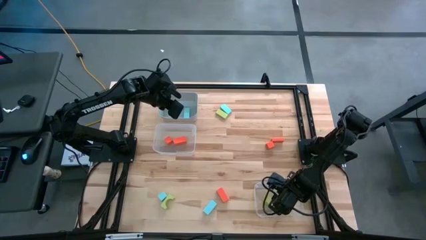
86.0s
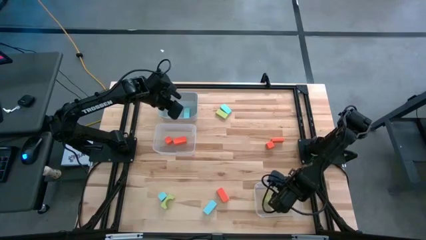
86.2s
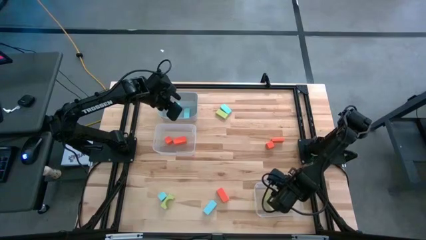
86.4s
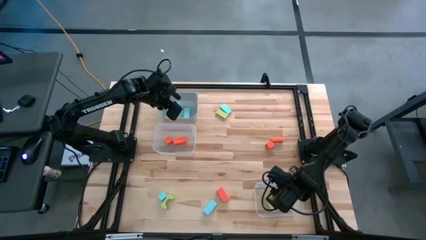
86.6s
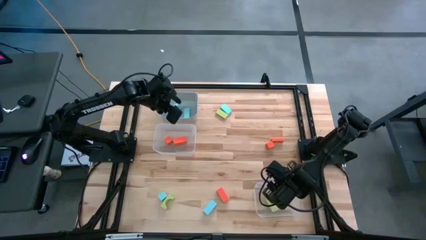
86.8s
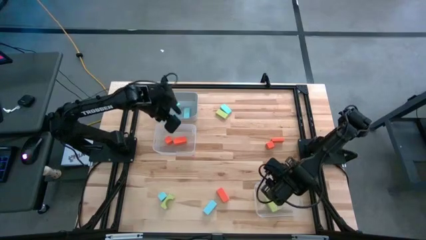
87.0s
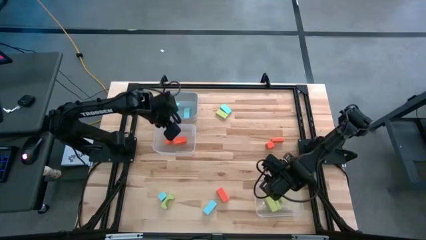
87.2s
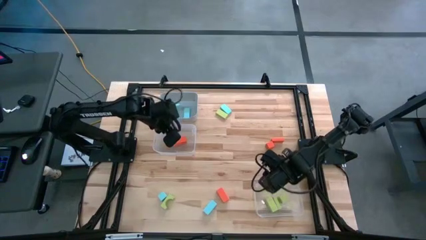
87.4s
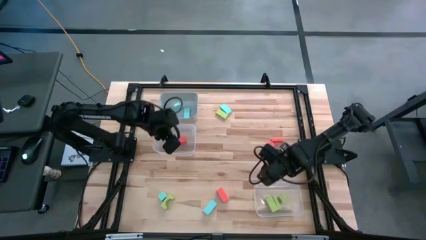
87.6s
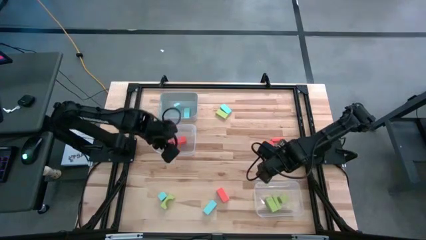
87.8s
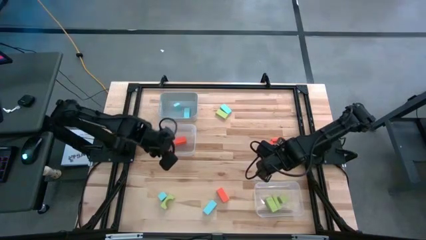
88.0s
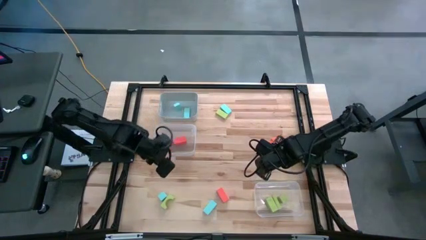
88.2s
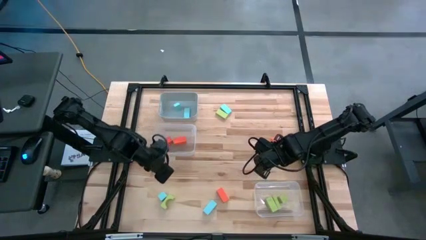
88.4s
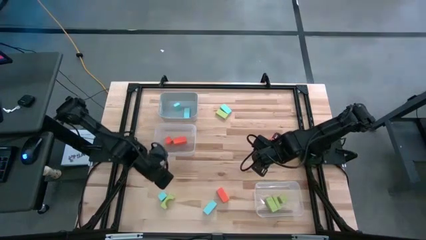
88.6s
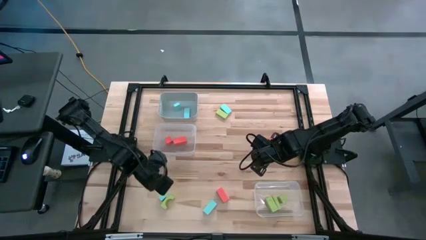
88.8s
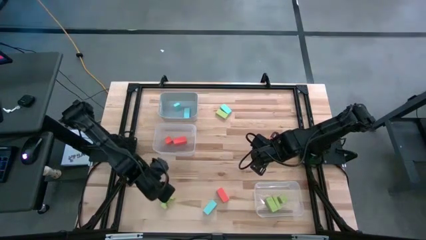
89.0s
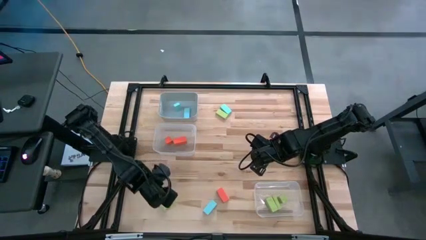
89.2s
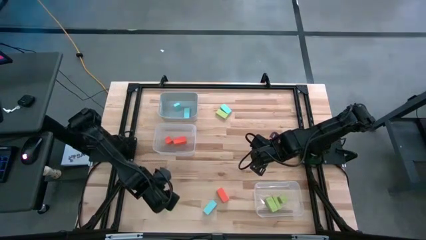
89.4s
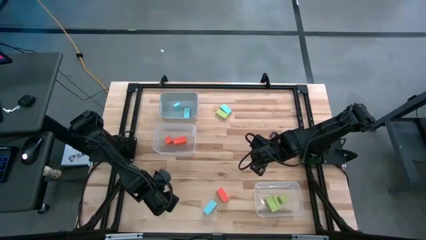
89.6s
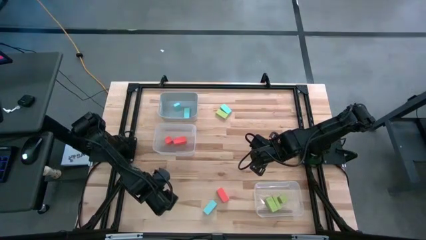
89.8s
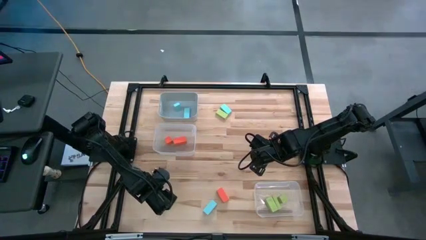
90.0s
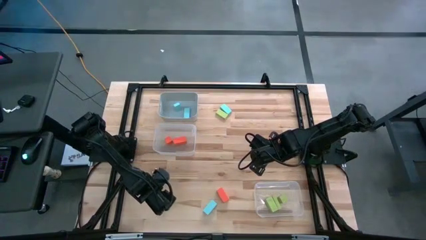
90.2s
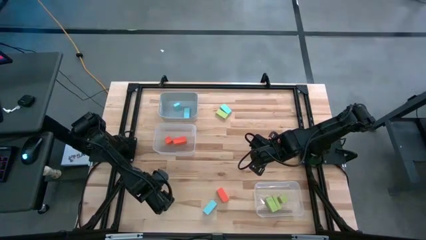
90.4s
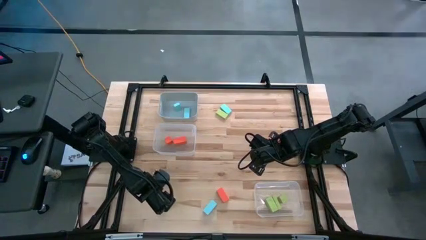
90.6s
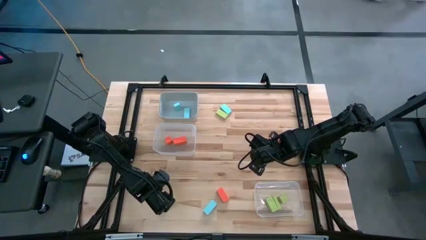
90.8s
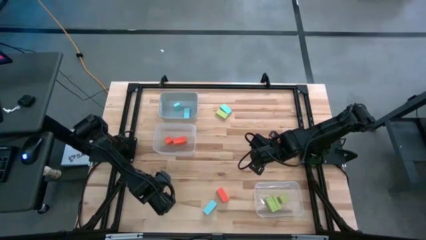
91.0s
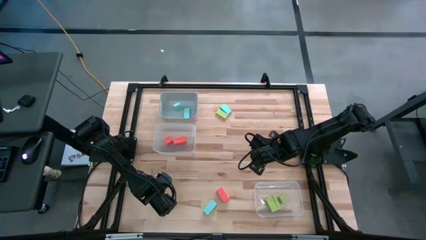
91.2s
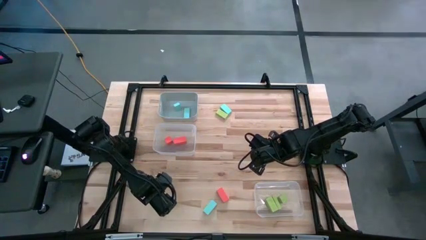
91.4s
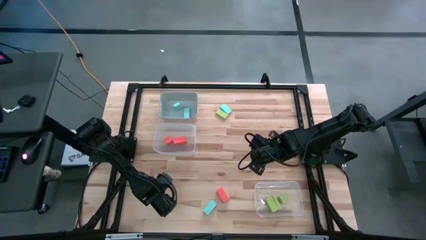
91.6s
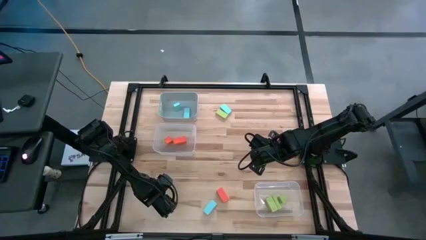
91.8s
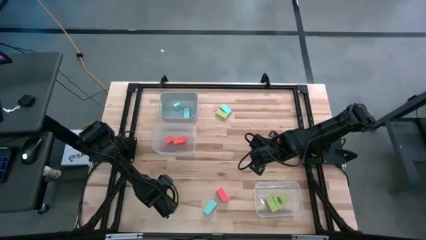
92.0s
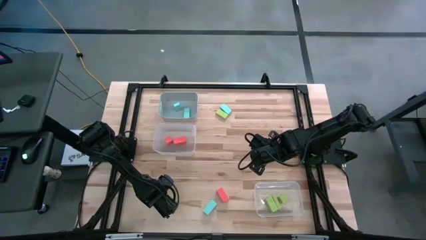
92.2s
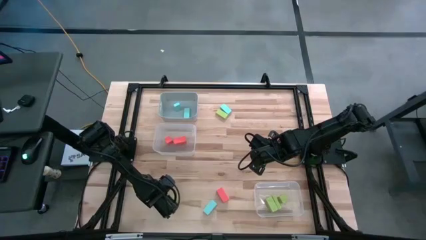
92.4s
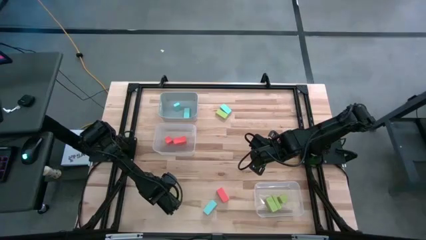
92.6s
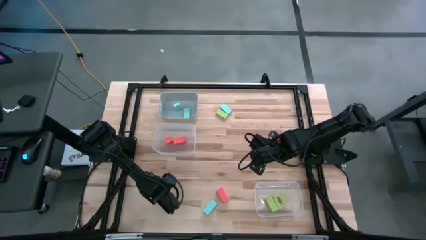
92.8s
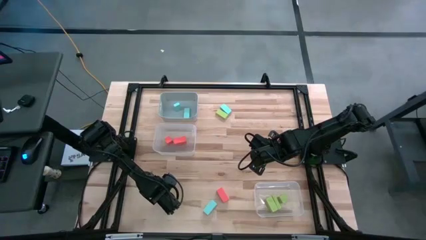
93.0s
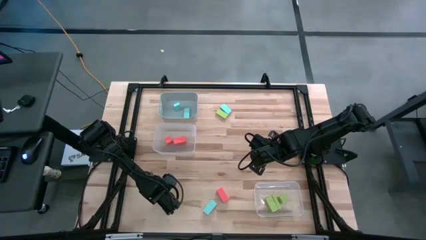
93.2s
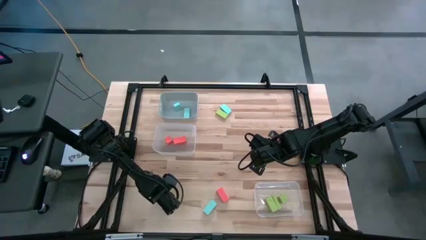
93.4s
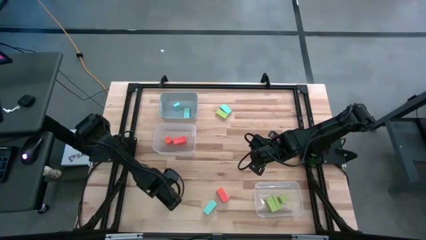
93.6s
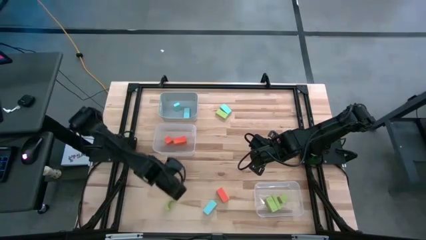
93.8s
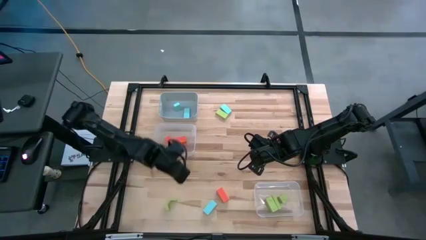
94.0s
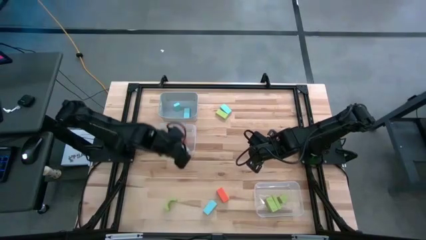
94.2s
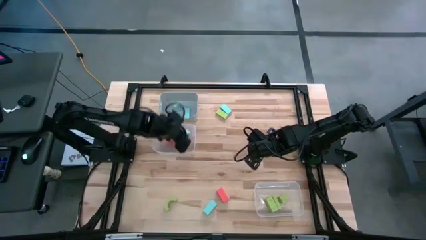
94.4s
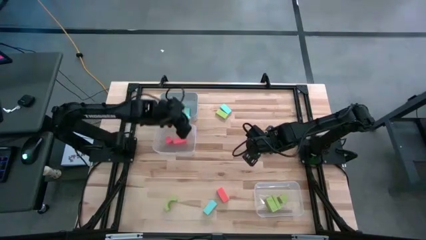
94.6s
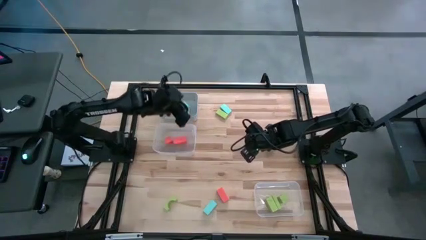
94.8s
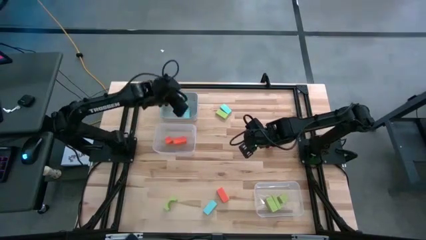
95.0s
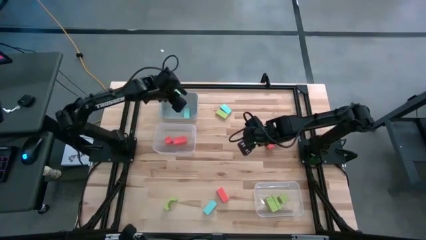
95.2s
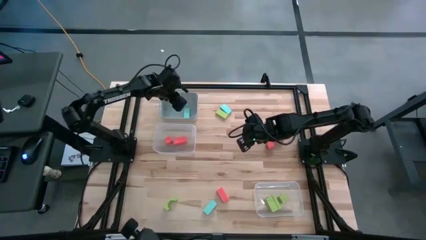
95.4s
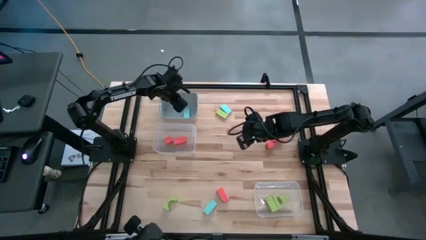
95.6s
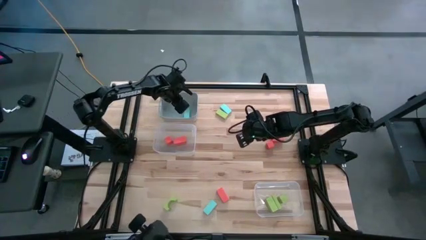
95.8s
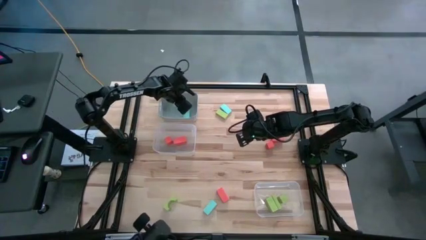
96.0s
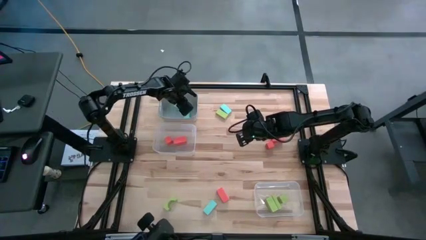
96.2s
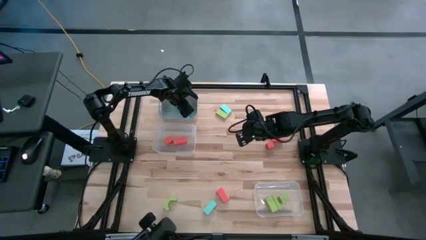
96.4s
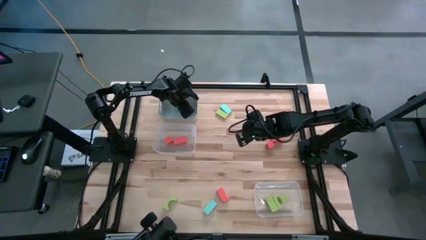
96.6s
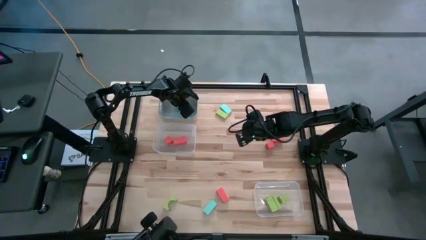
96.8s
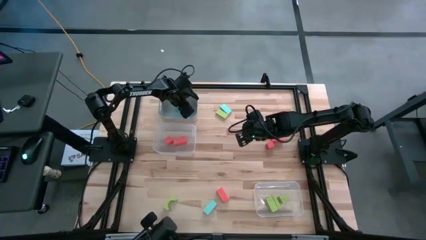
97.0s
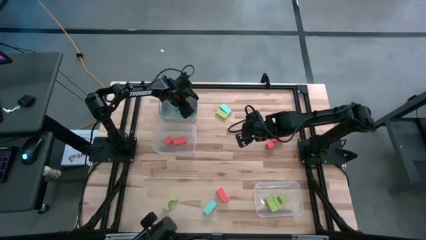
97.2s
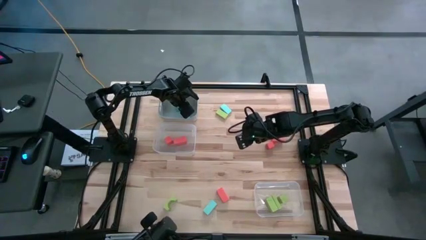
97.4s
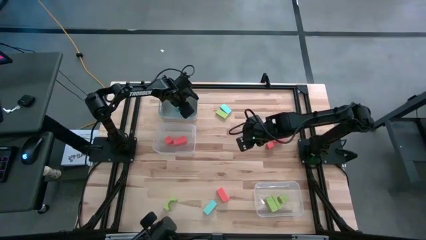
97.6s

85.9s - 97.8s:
Task: Sort & place blocks by color
Put the blue block into the gray bin

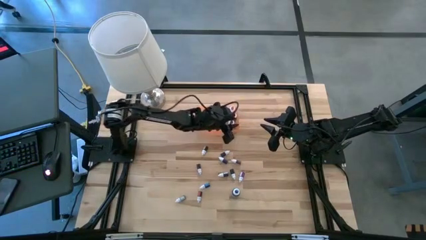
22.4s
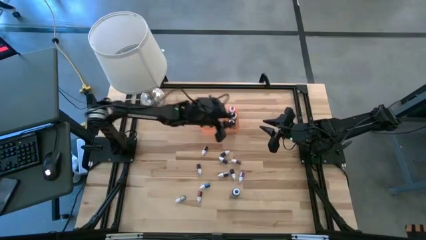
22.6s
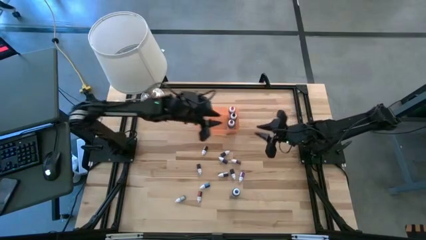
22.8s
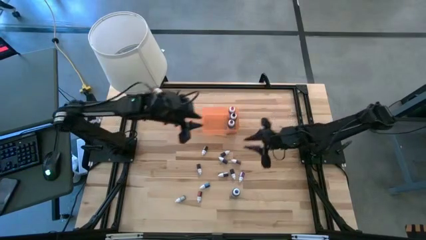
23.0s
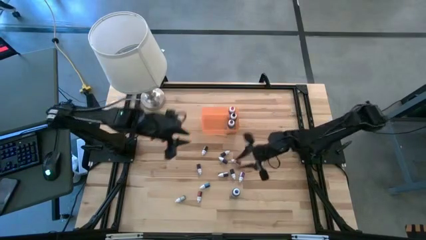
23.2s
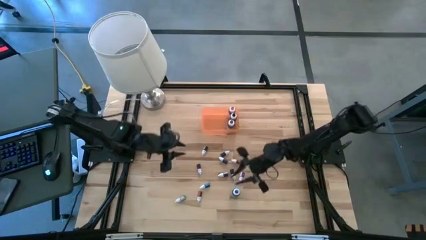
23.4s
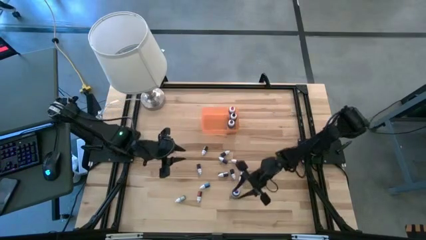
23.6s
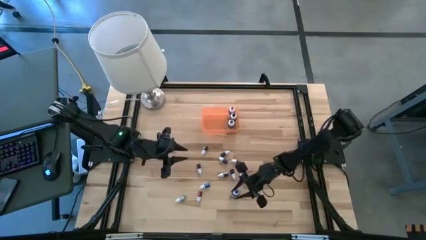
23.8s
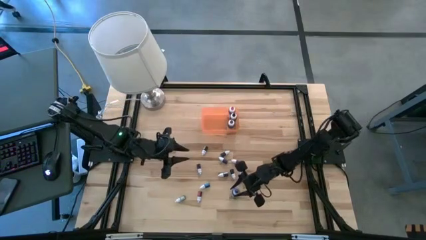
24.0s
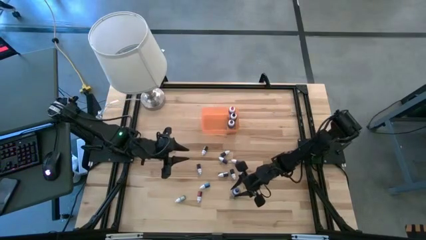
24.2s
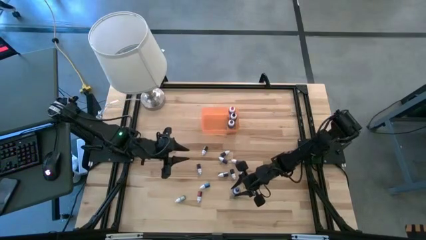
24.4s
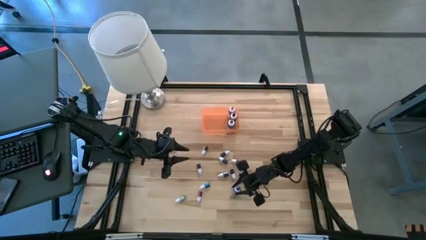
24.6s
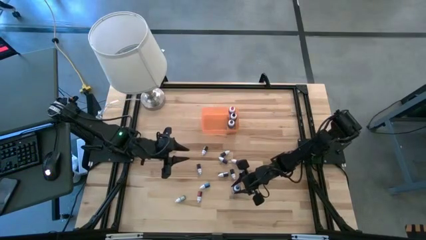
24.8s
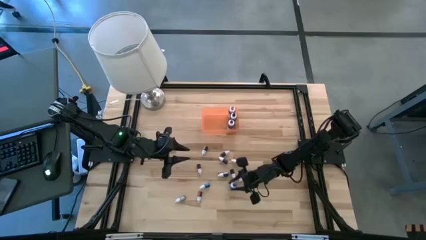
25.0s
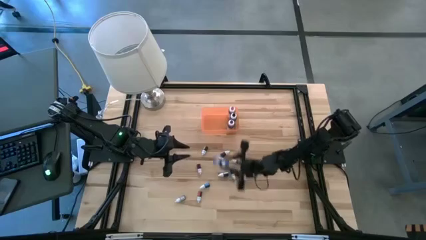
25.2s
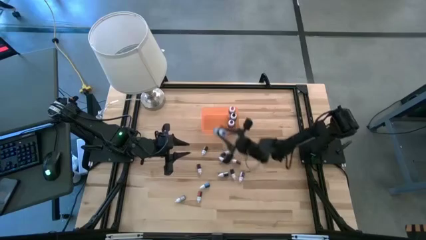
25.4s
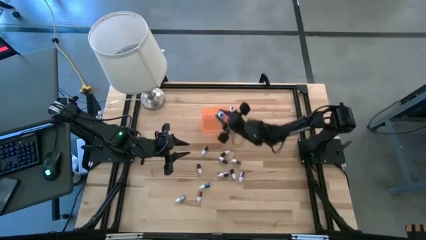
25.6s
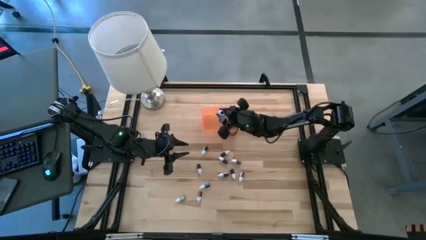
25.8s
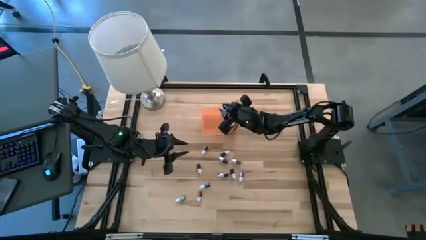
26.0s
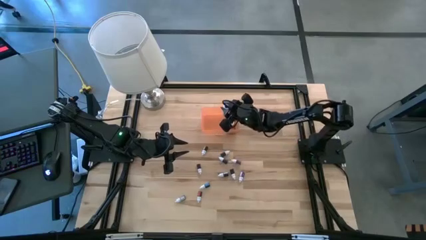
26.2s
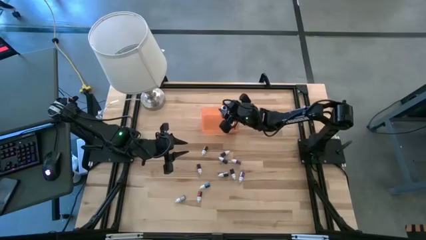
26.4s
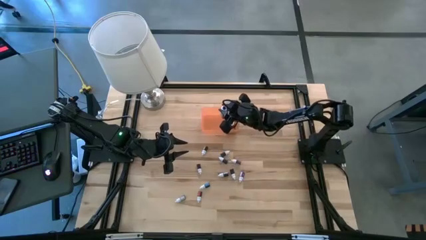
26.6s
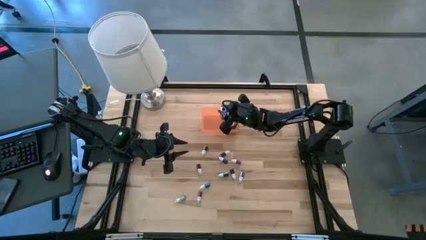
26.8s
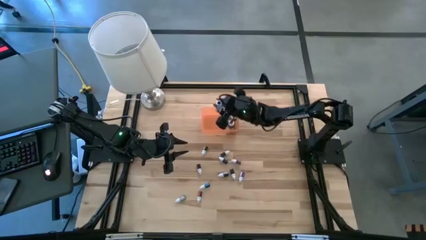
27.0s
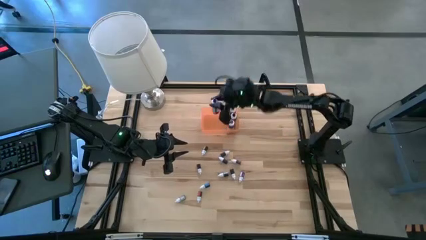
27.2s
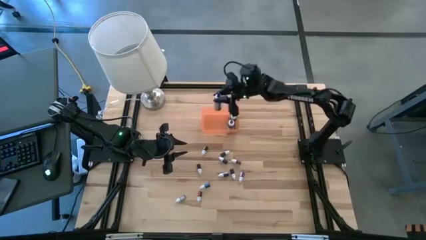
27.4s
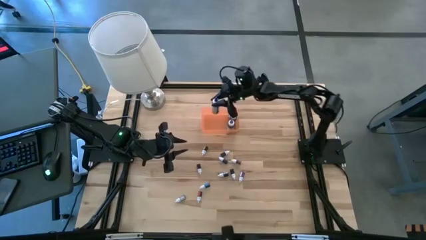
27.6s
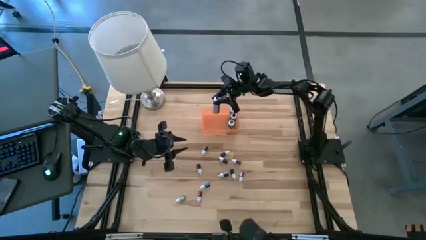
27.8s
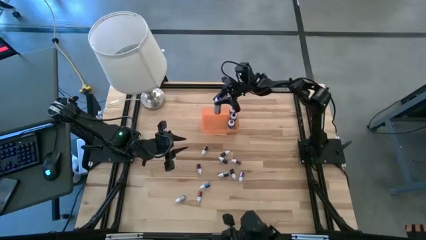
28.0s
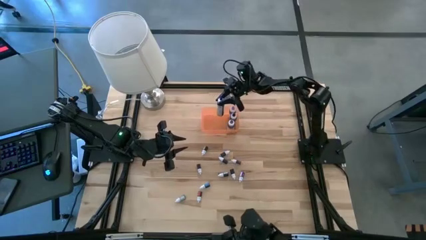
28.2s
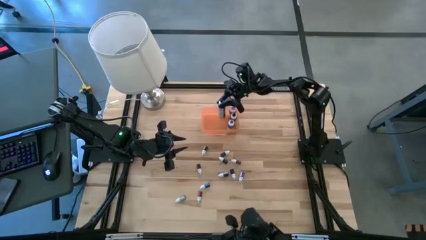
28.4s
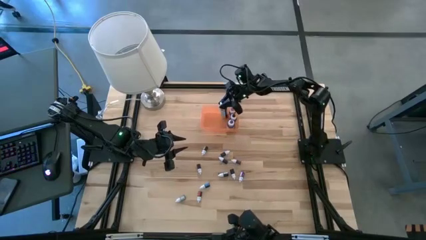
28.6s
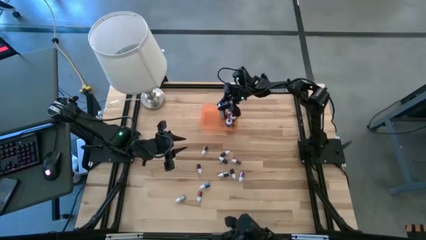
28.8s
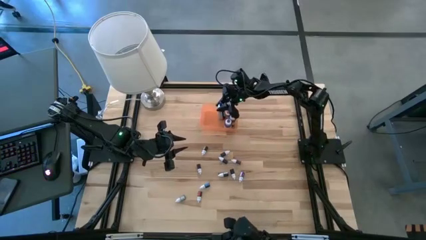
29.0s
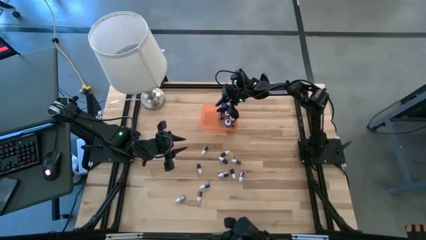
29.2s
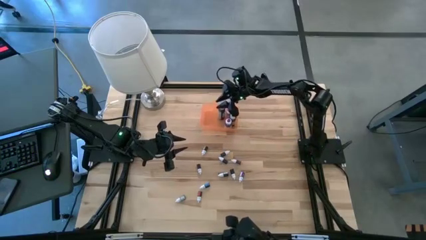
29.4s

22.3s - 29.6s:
Task: Pick & Place food coloring
Put the large blue food coloring bottle into the bin
